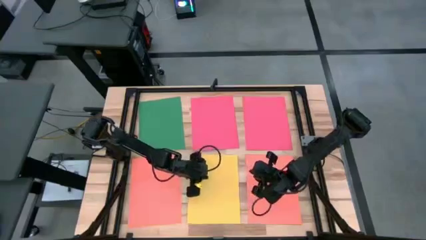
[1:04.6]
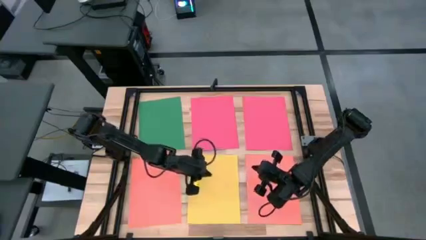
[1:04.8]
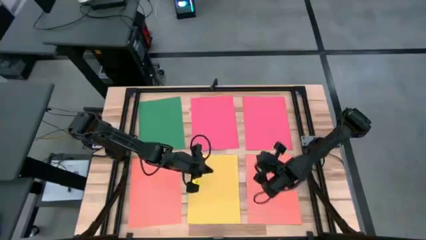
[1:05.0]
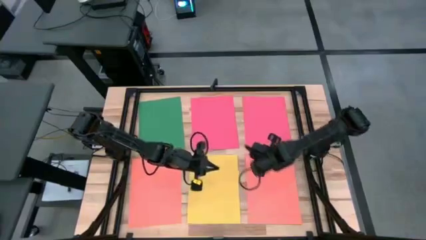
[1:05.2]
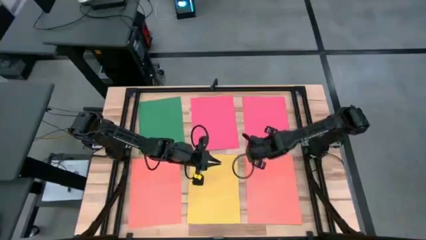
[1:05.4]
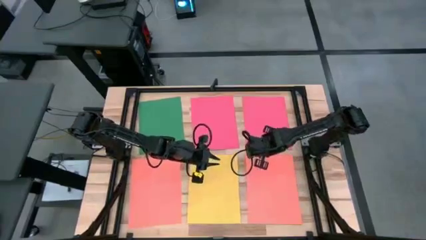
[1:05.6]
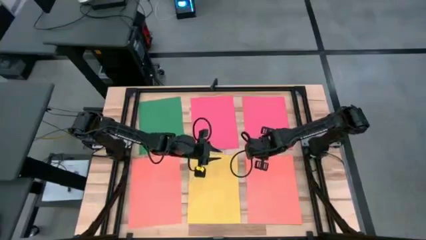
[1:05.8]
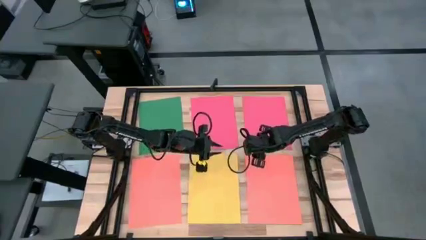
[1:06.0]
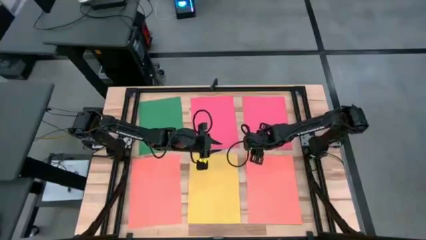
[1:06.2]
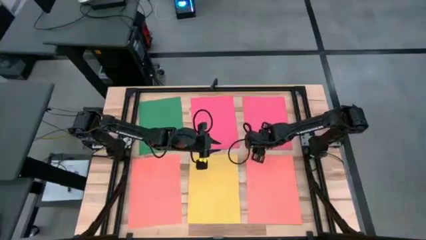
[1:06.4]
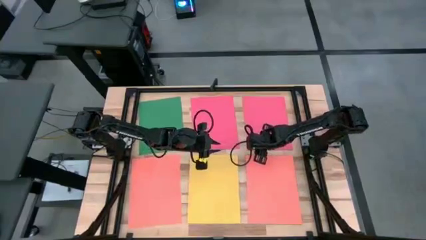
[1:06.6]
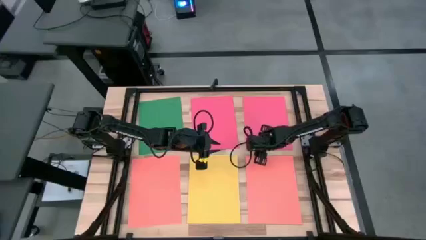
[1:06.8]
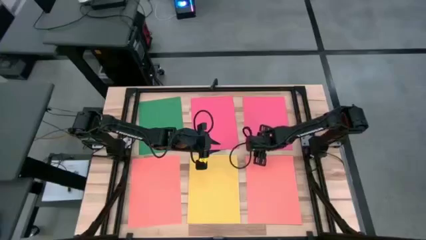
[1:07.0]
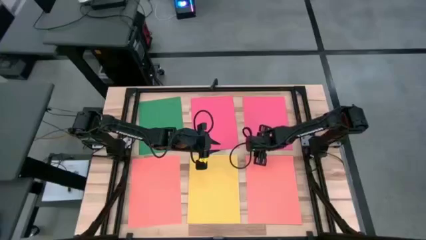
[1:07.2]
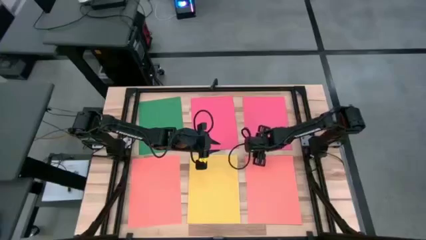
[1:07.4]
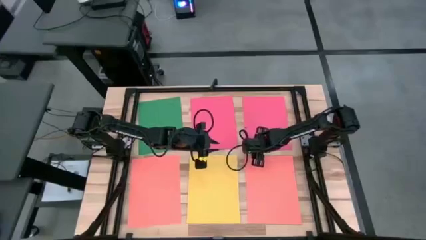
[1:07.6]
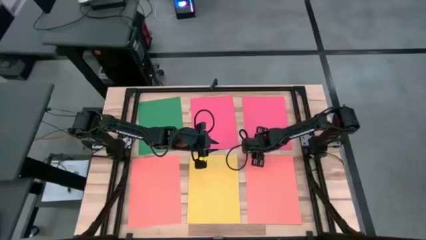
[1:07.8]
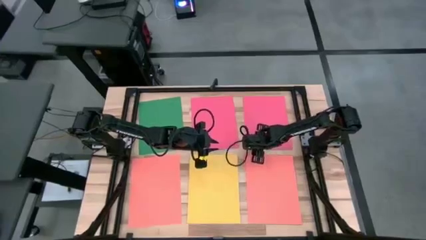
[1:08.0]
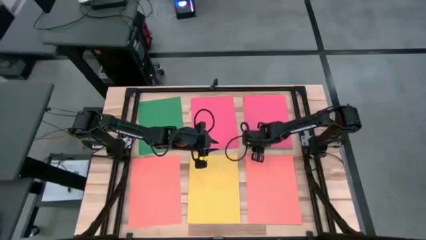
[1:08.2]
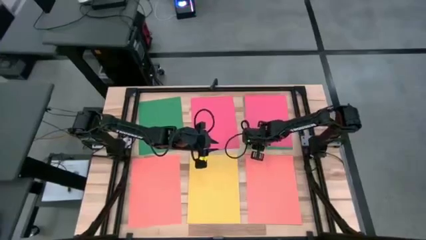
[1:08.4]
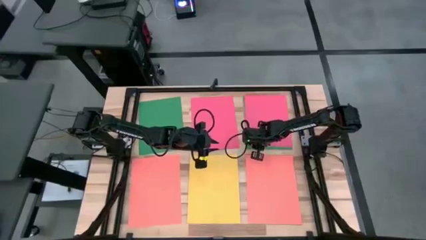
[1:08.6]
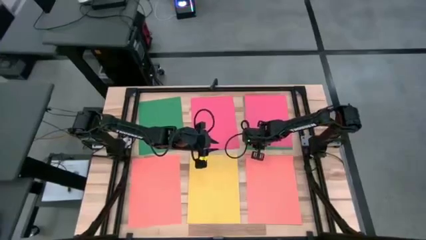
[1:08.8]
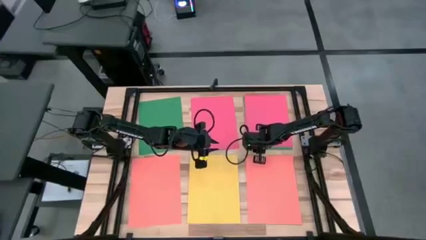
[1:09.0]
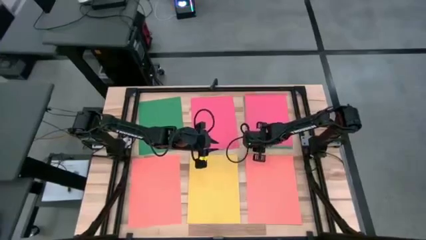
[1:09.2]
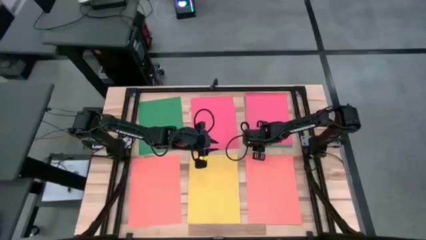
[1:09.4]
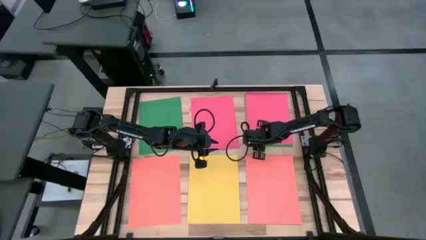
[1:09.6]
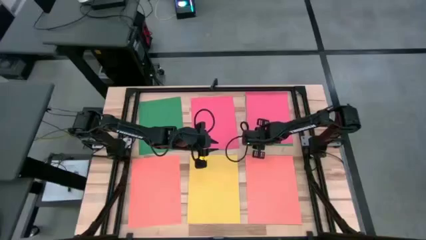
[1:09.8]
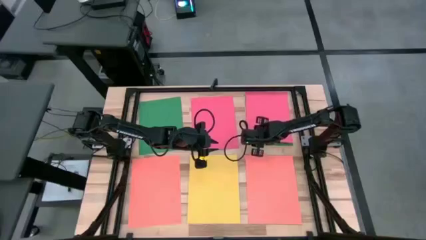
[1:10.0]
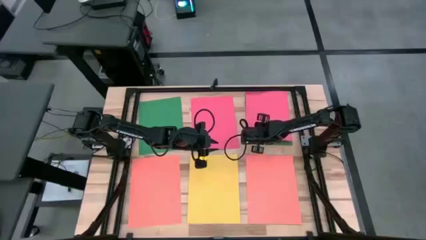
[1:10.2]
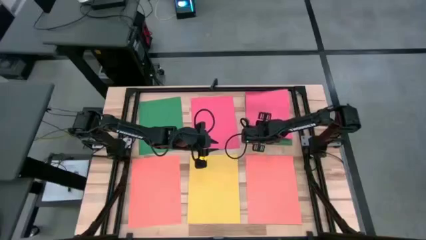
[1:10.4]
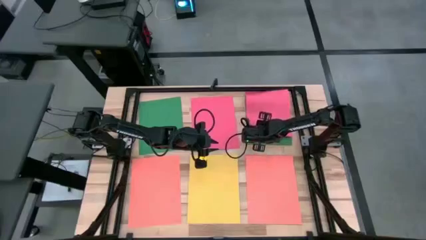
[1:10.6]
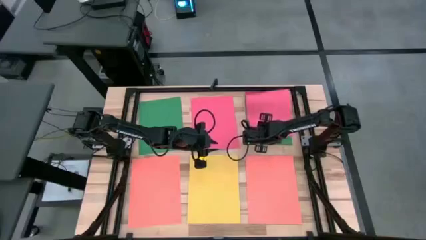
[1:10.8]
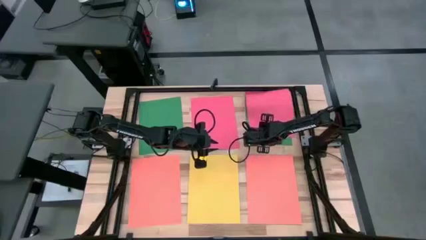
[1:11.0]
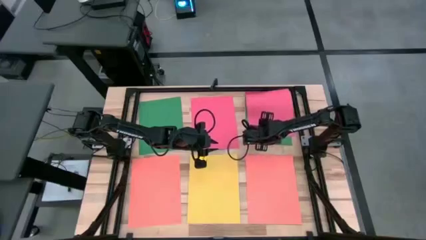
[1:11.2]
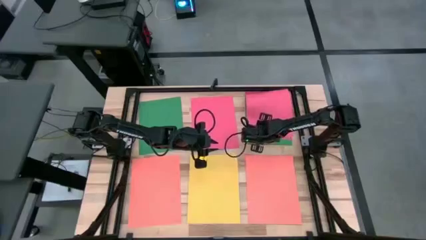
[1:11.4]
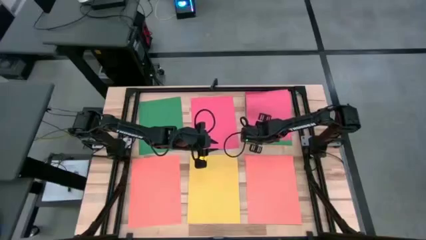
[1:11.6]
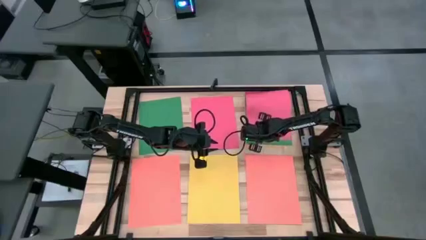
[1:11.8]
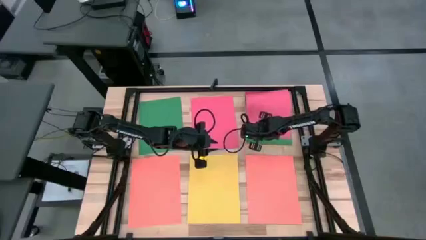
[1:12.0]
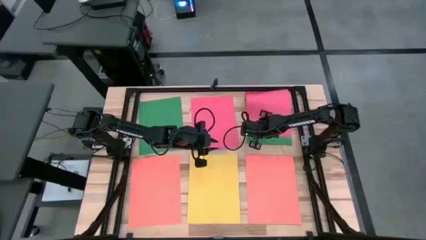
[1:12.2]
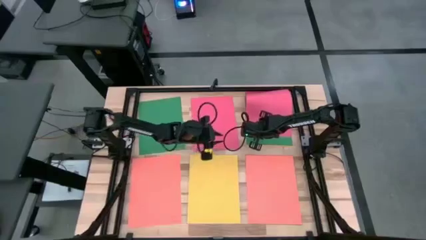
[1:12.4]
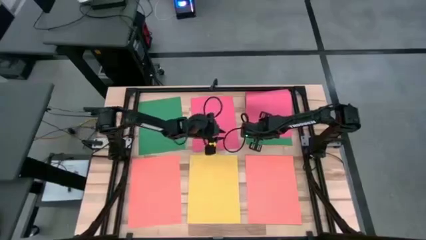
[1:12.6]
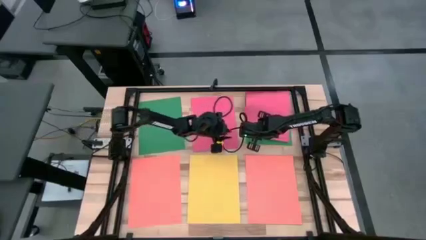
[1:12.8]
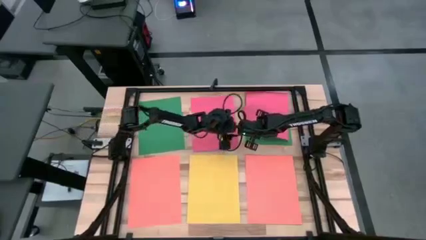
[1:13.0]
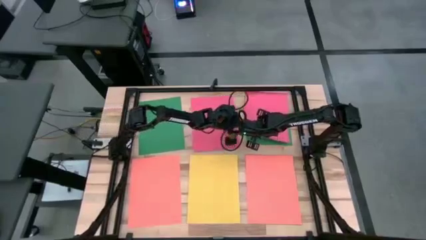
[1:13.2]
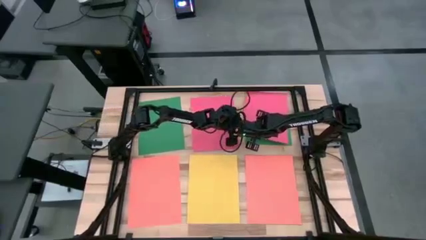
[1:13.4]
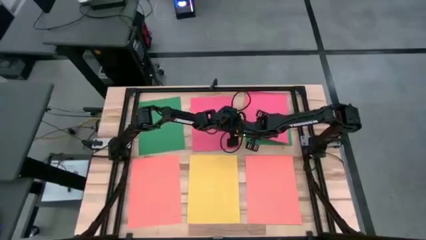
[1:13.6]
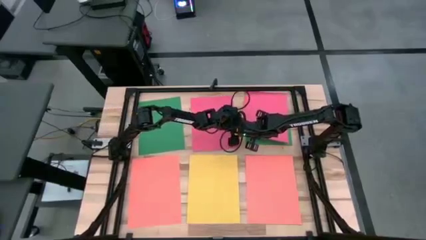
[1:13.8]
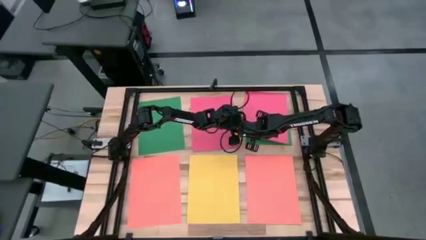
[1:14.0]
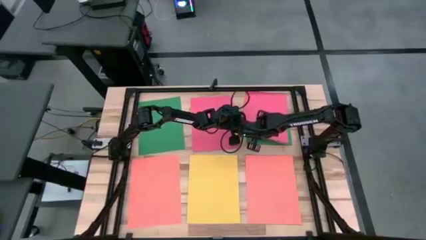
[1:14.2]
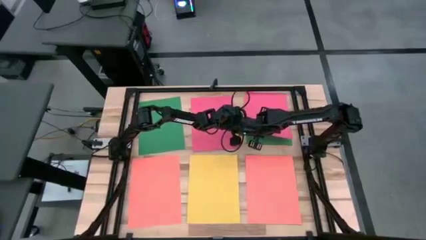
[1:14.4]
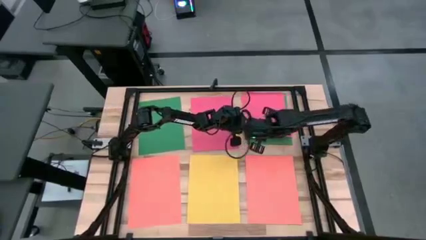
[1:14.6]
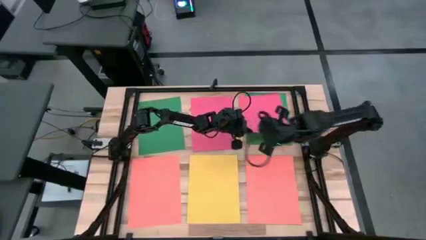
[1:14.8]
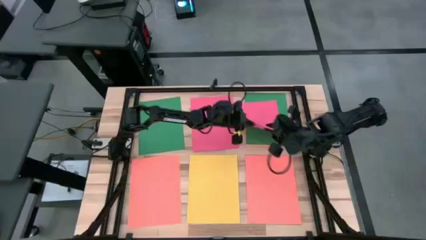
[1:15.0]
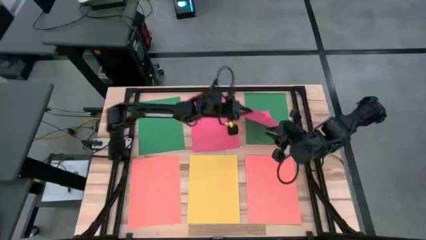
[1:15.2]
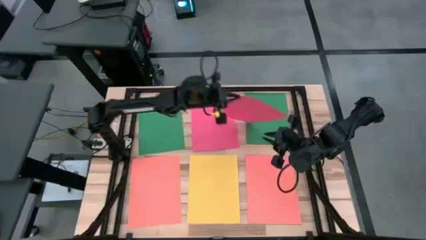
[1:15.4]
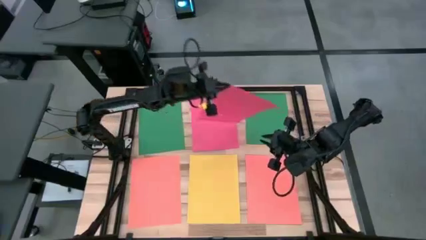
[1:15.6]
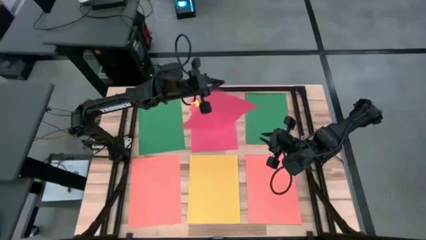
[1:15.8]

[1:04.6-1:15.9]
Task: Organize paper
Stack the pink paper on top of the pink paper
